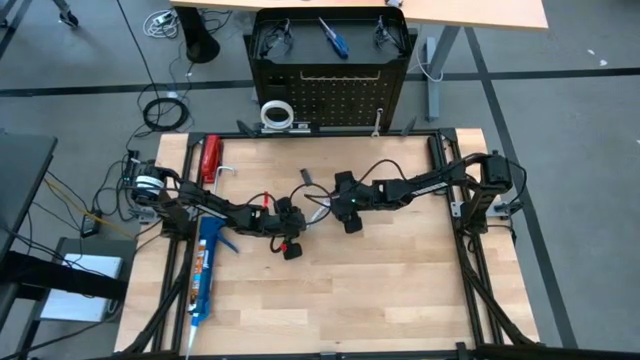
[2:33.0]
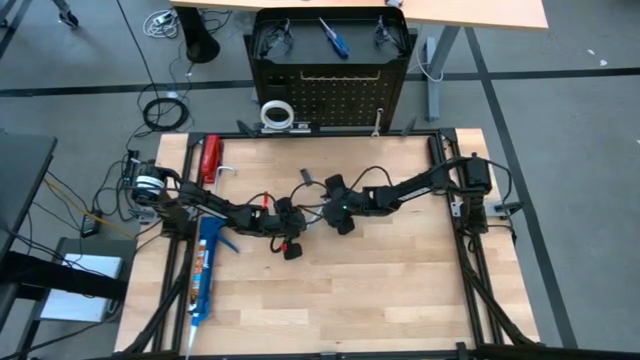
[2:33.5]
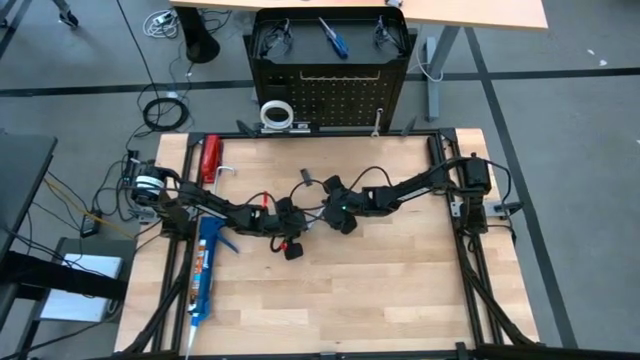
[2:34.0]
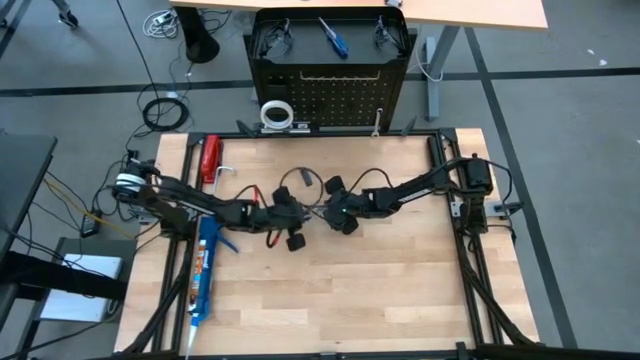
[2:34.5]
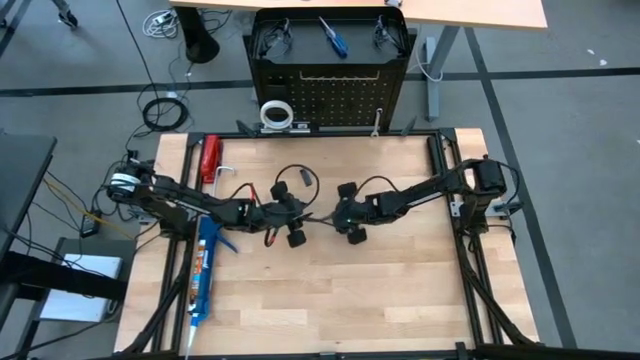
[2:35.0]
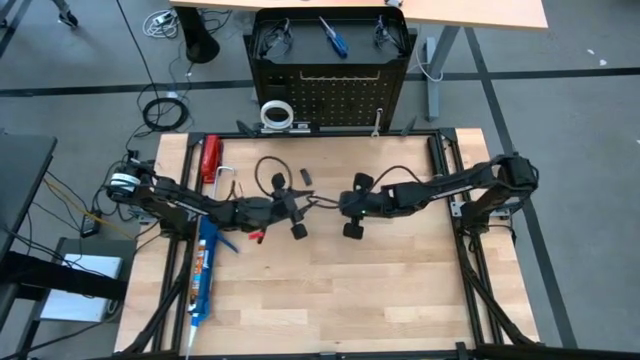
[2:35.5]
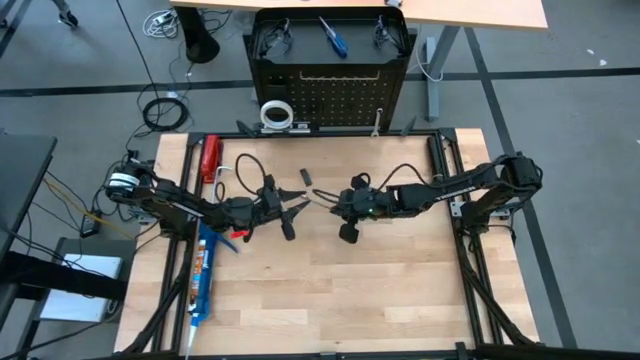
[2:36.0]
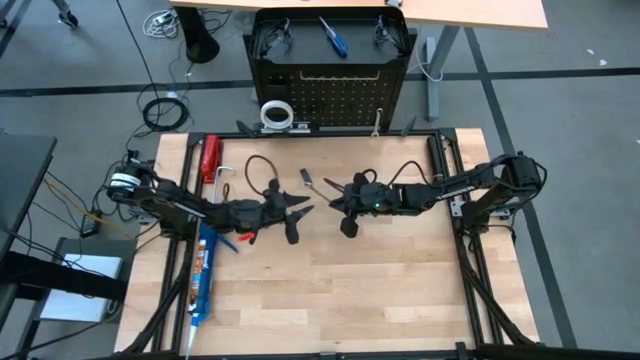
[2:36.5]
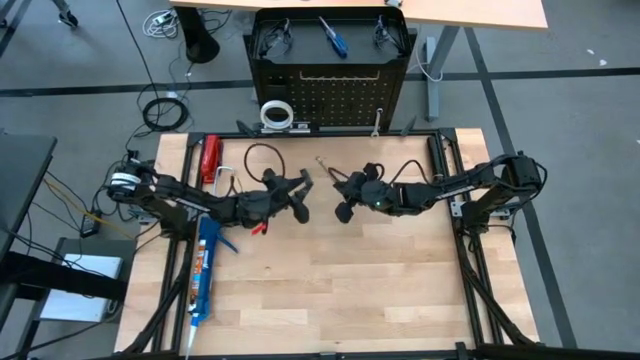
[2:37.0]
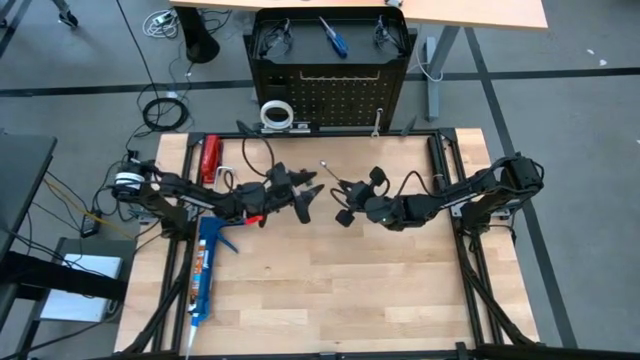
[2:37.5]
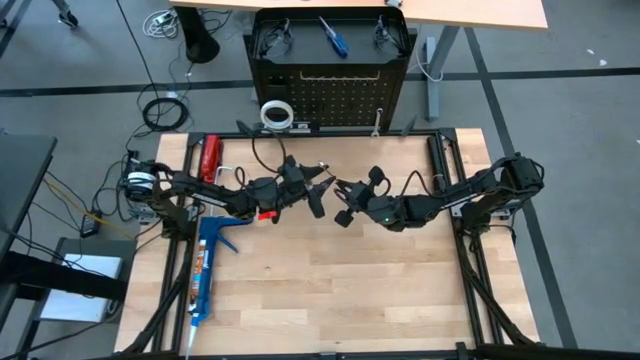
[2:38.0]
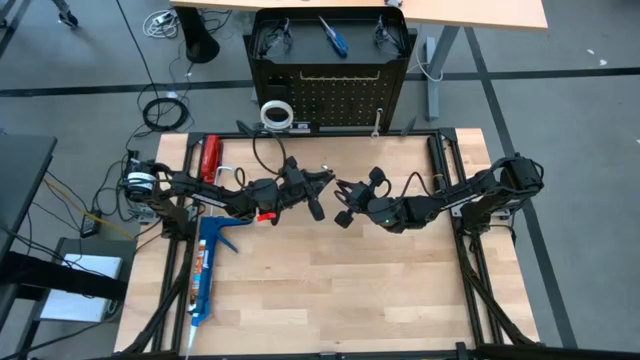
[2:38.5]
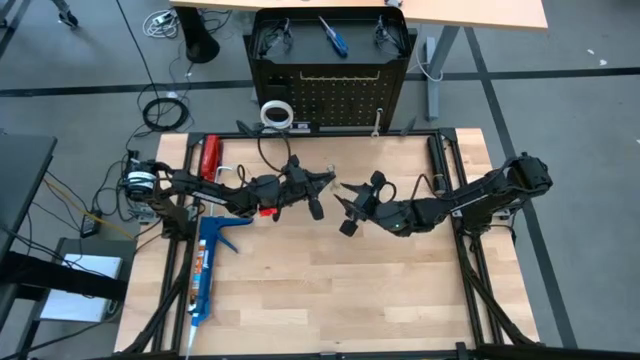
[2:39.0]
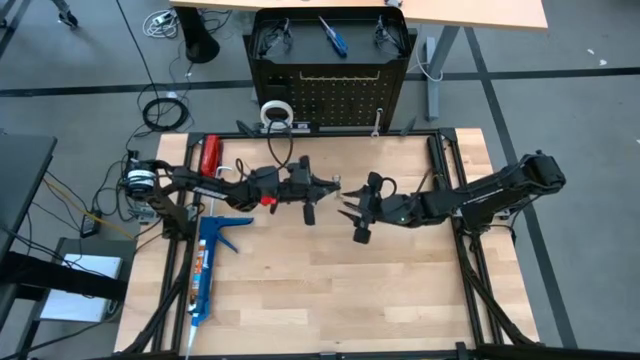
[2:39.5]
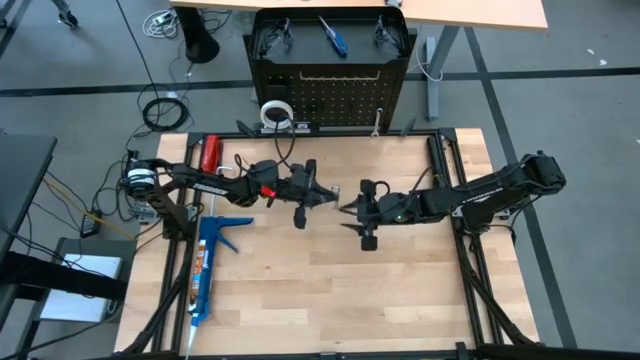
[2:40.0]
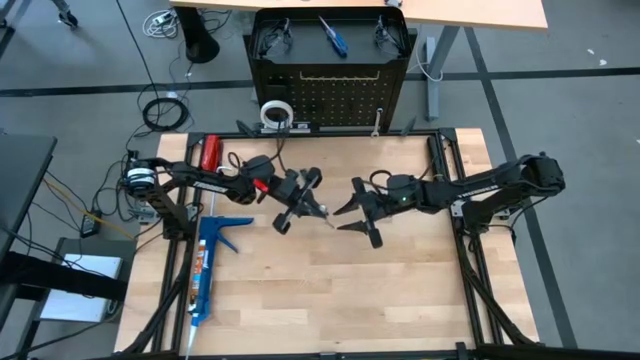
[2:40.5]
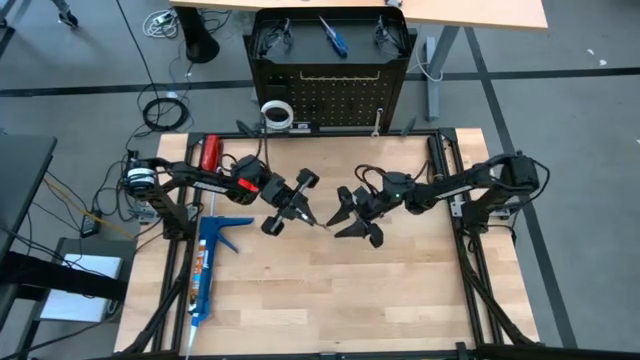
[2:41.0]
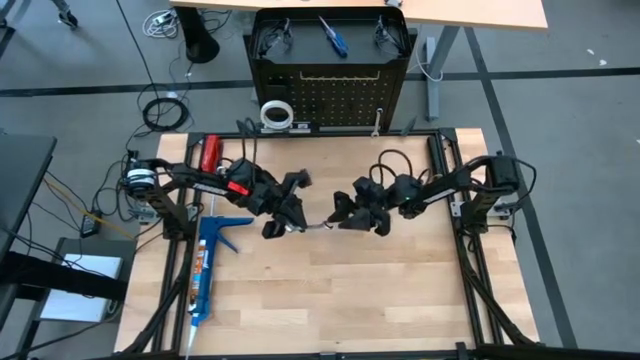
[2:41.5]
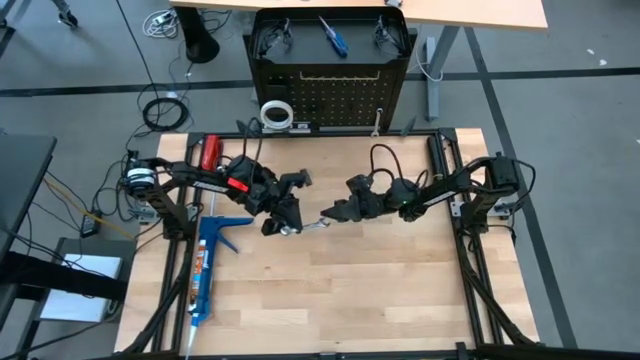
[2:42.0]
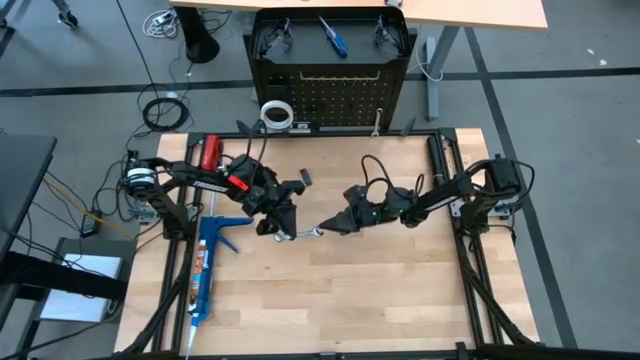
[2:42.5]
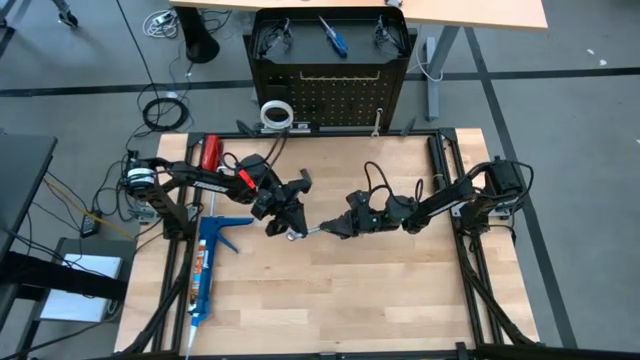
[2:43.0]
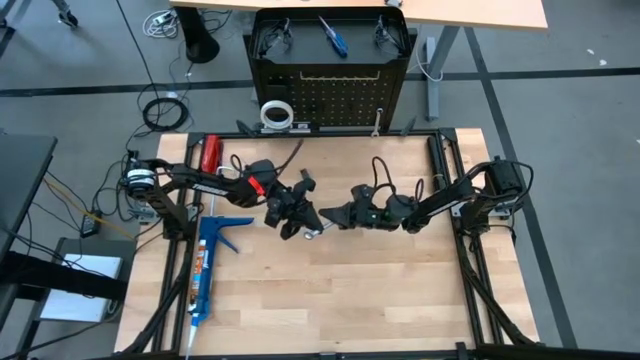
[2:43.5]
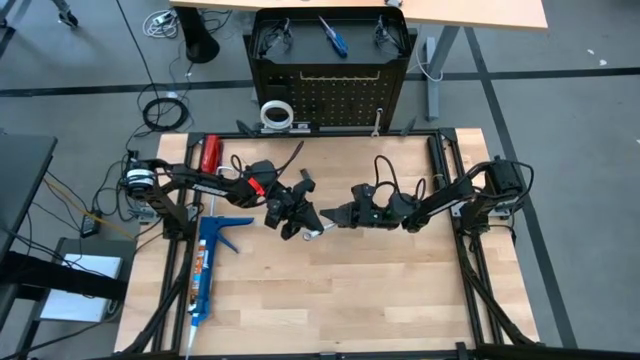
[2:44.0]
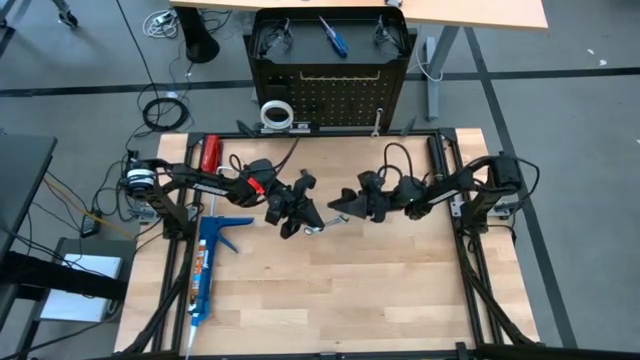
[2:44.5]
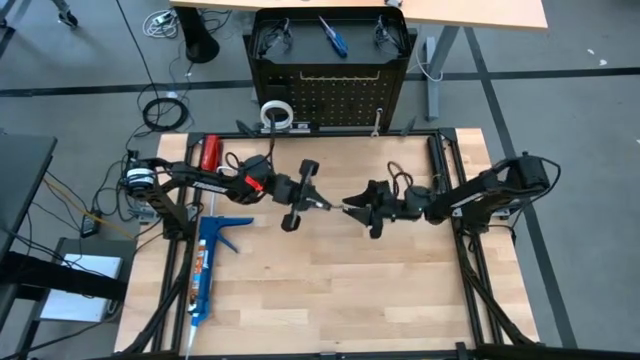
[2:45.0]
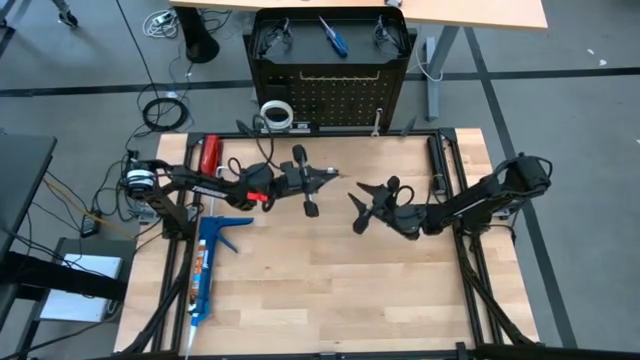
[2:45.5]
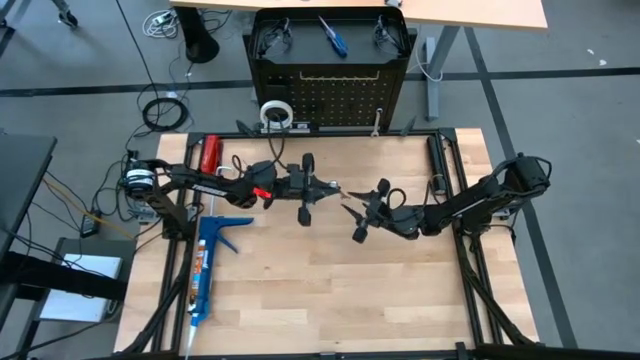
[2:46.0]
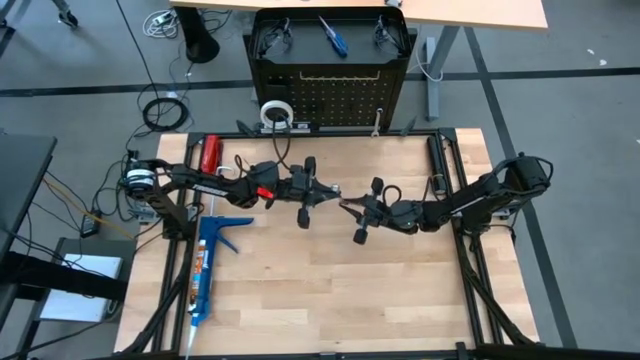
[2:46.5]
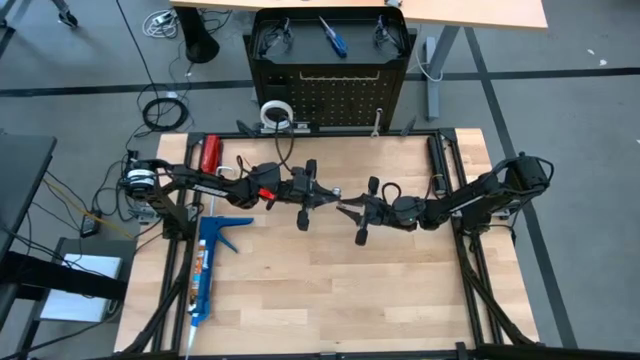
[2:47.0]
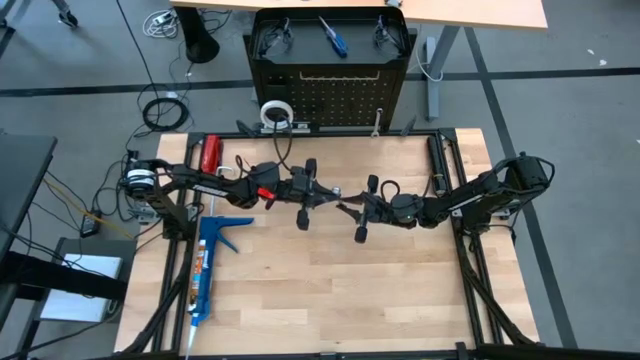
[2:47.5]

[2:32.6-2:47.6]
Task: Hang tools onto peg board
Hang the wrench onto the black pegboard

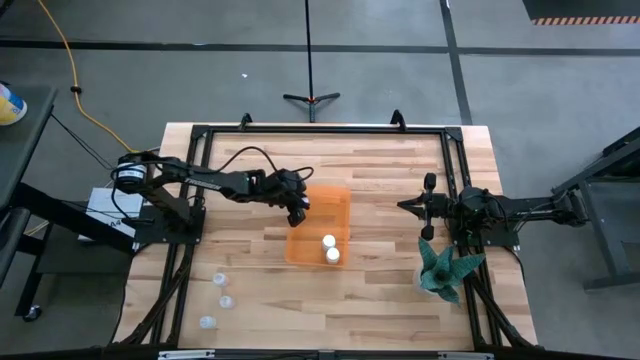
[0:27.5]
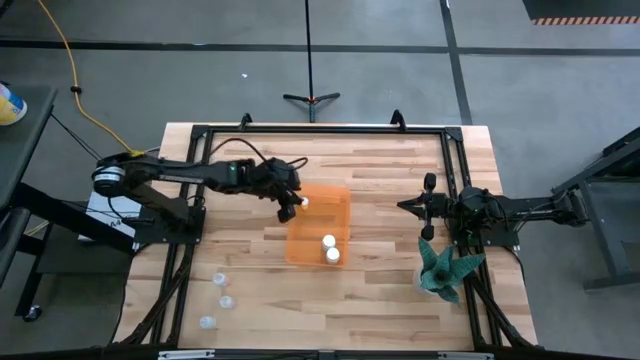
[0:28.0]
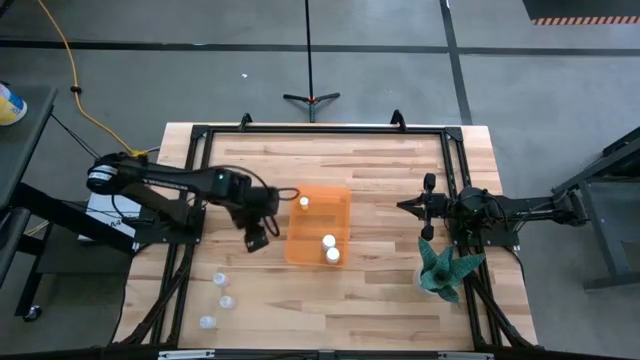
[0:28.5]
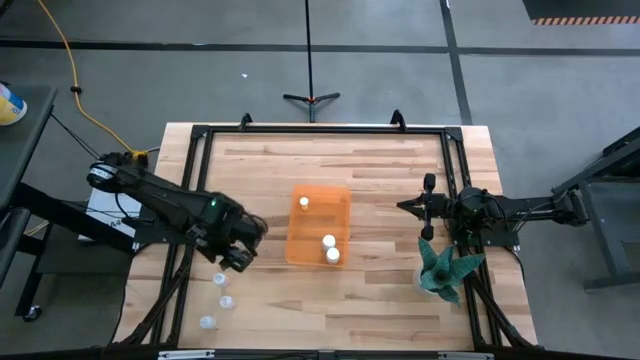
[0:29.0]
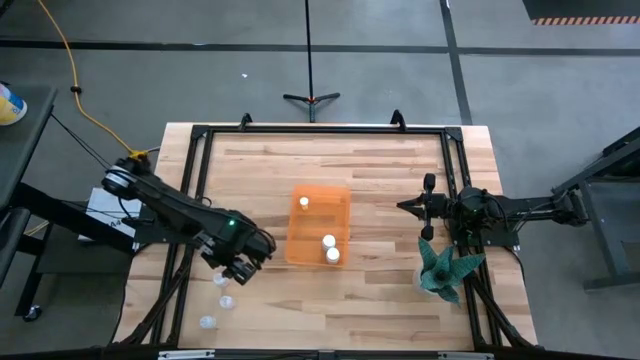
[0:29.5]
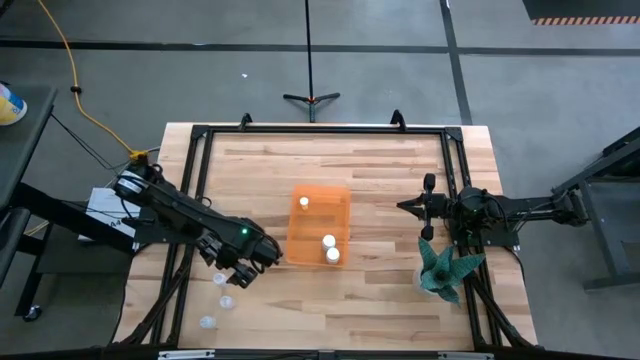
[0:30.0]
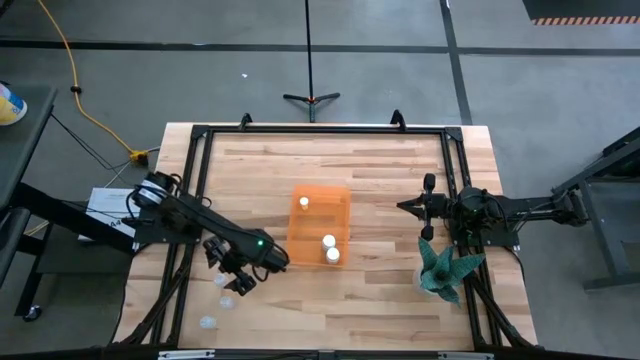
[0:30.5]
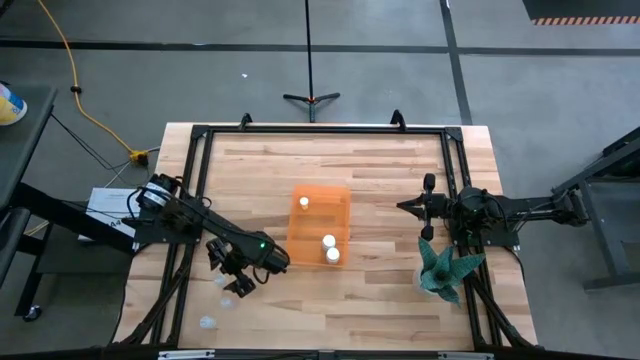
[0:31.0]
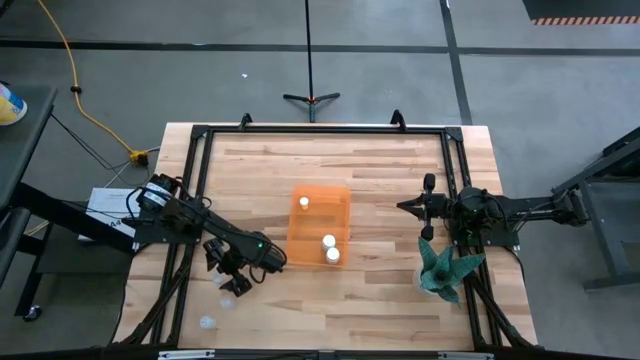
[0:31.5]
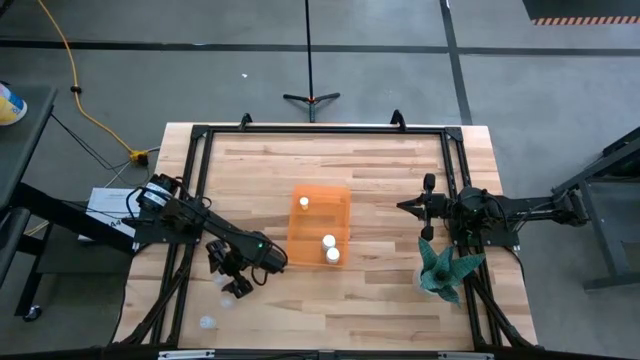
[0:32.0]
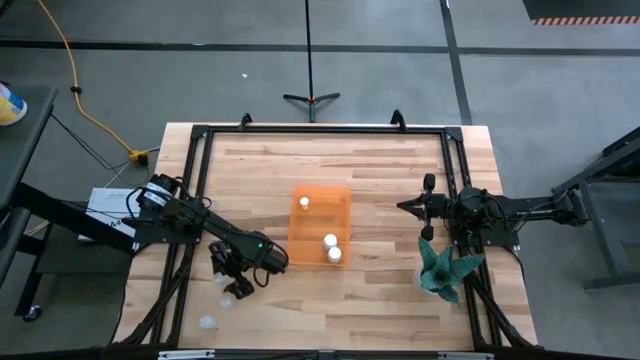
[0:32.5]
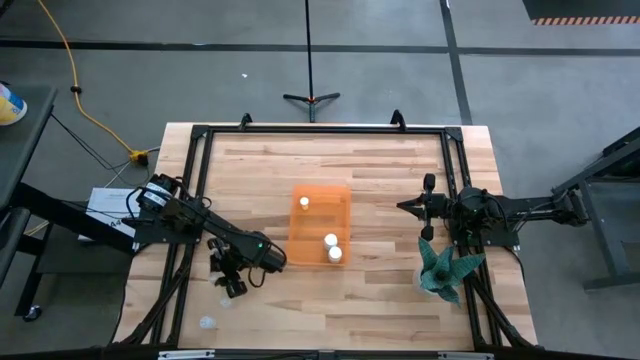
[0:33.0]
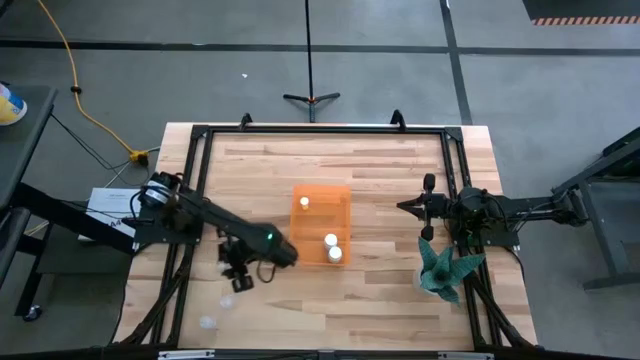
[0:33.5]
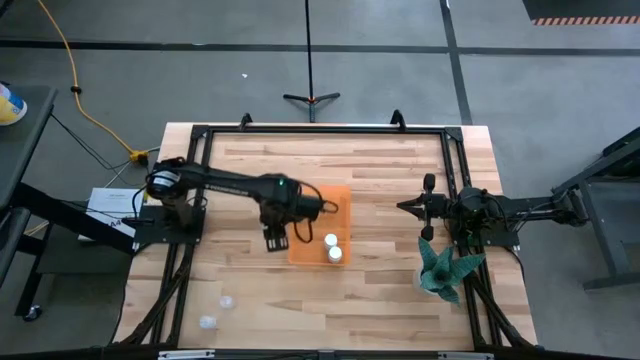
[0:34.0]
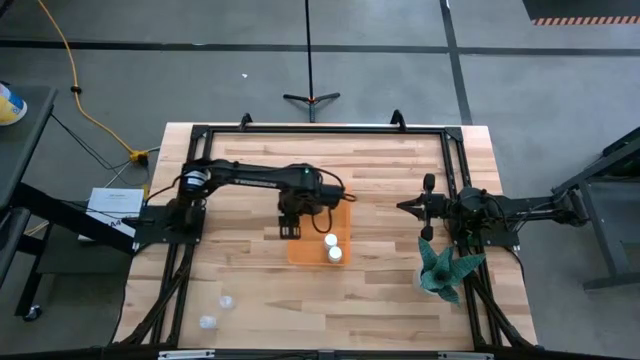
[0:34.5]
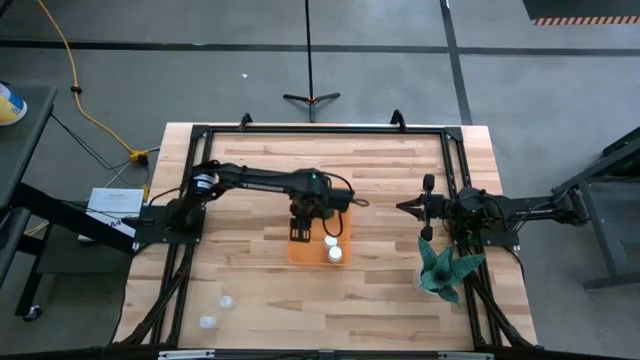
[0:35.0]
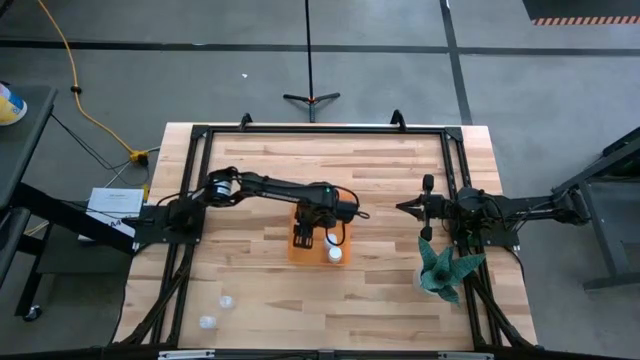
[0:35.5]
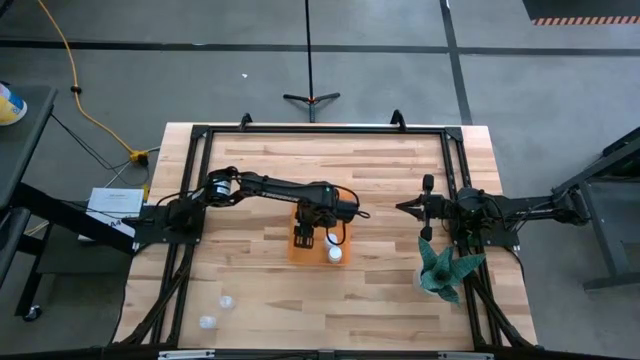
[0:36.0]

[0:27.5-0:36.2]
Task: Pick and place pill bottles into a basket
Put the top transparent pill bottle into the orange bin
